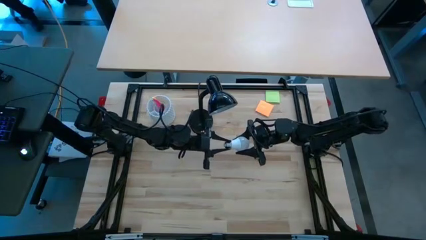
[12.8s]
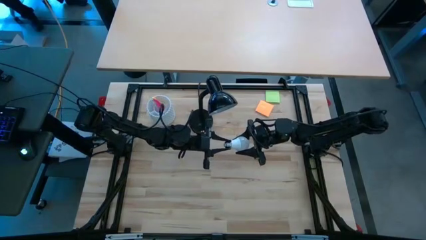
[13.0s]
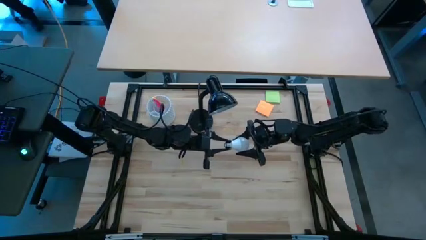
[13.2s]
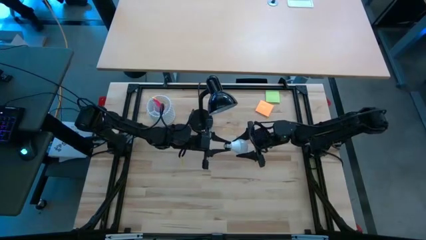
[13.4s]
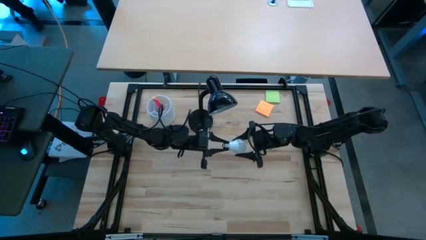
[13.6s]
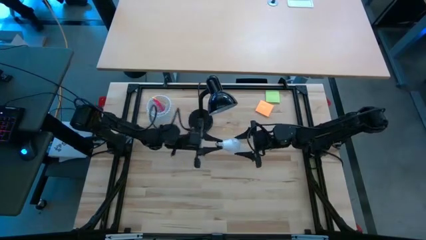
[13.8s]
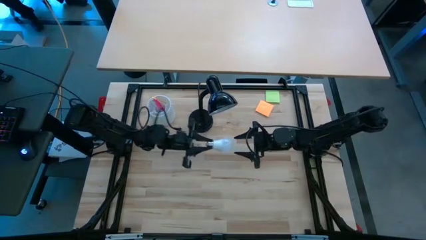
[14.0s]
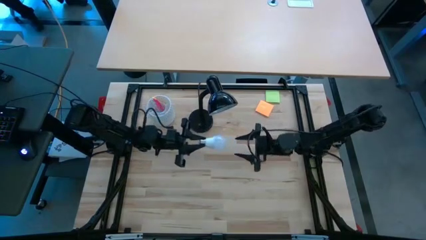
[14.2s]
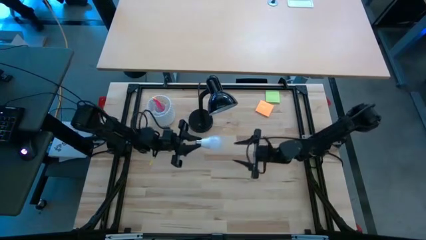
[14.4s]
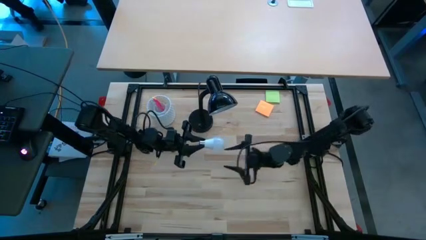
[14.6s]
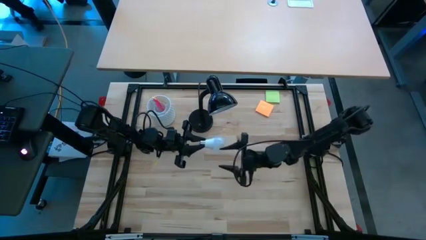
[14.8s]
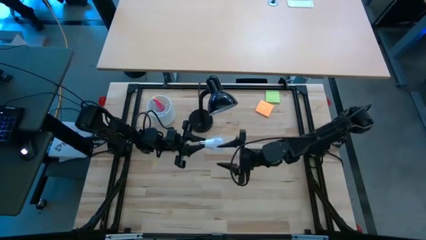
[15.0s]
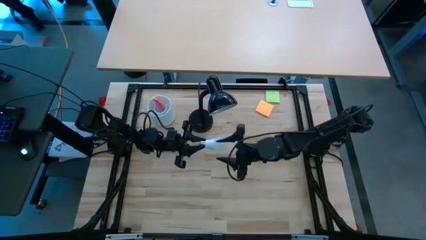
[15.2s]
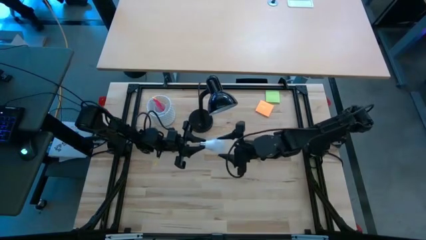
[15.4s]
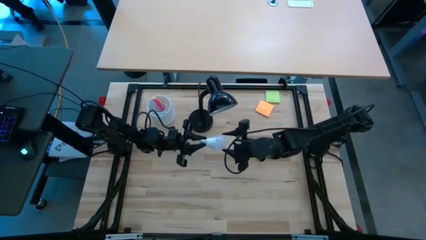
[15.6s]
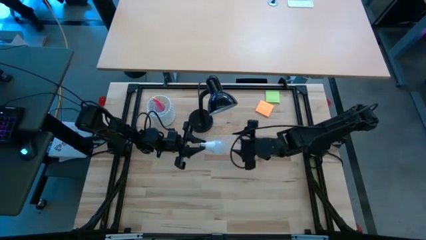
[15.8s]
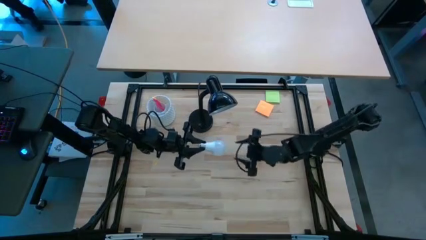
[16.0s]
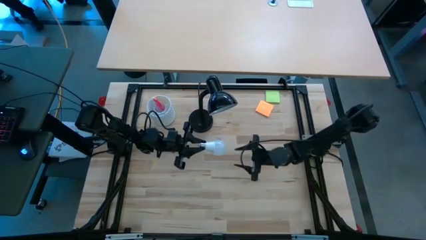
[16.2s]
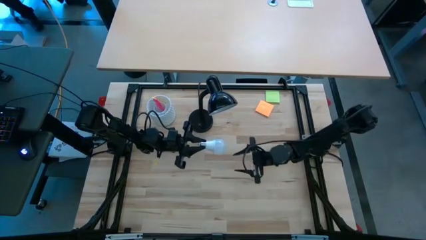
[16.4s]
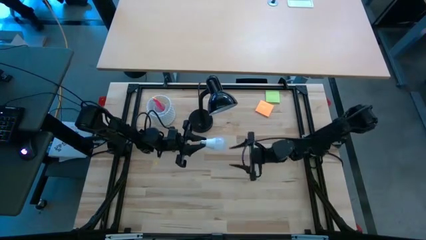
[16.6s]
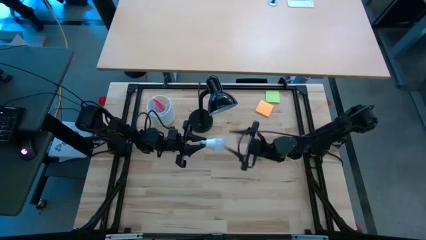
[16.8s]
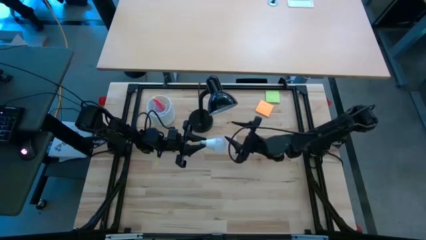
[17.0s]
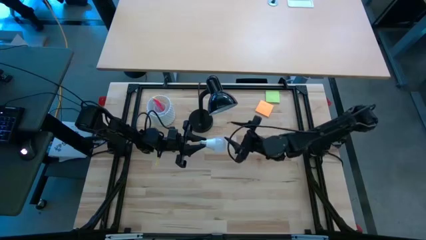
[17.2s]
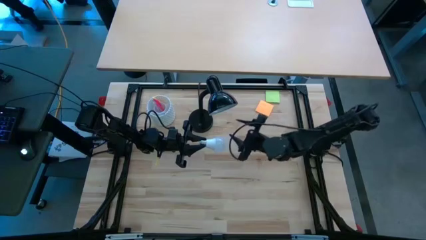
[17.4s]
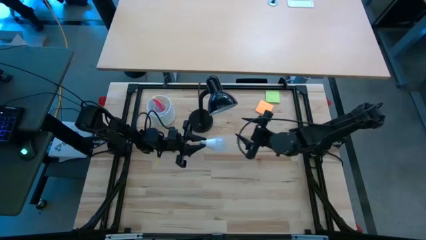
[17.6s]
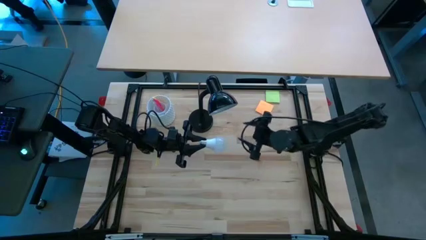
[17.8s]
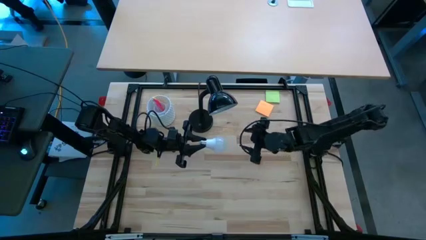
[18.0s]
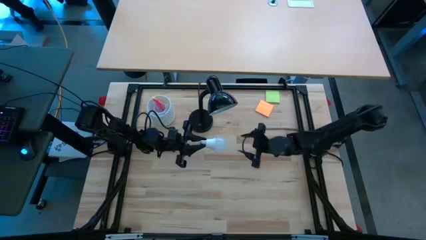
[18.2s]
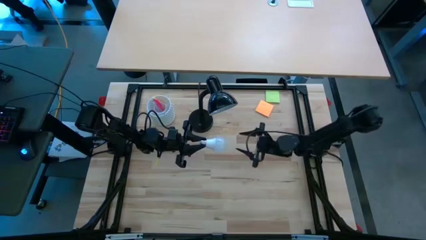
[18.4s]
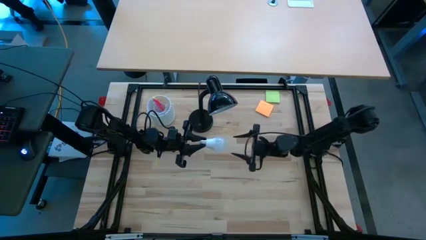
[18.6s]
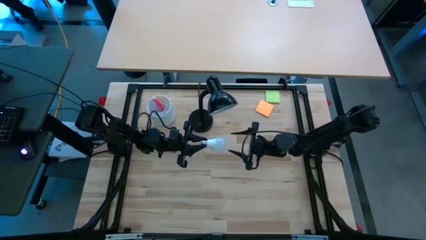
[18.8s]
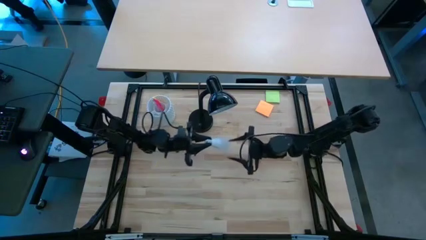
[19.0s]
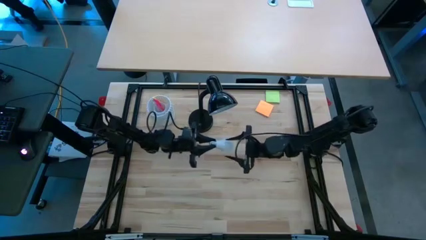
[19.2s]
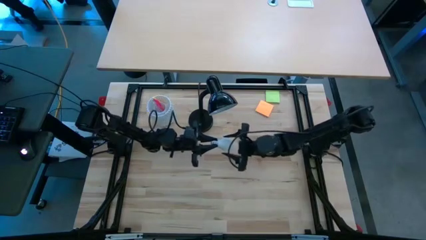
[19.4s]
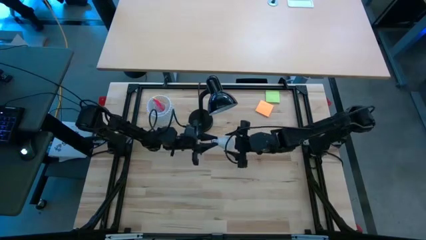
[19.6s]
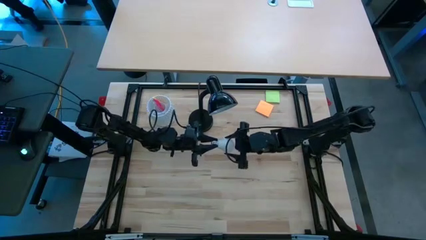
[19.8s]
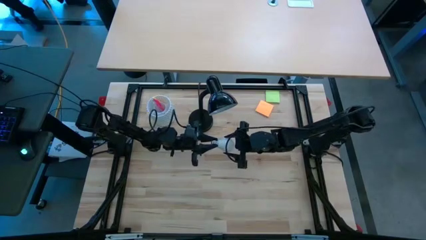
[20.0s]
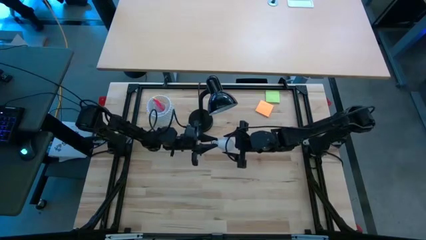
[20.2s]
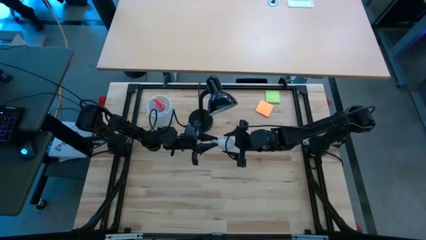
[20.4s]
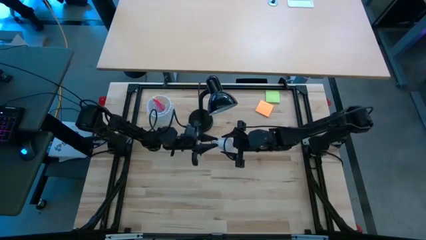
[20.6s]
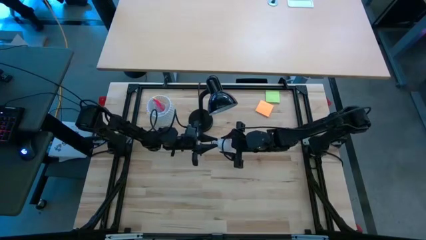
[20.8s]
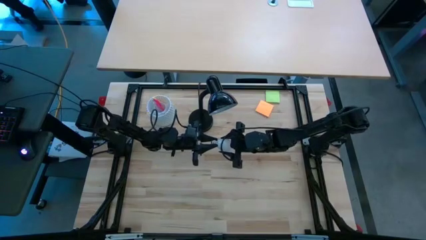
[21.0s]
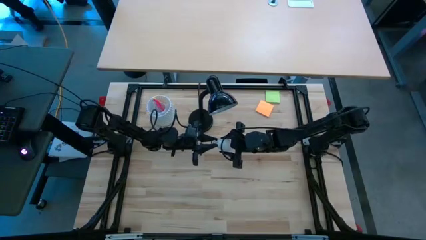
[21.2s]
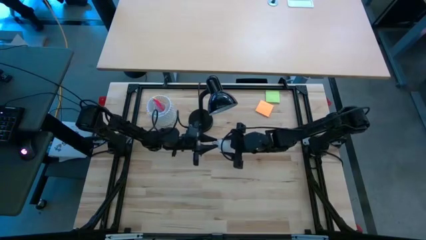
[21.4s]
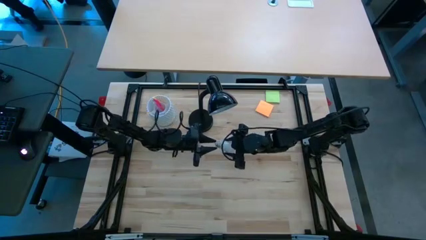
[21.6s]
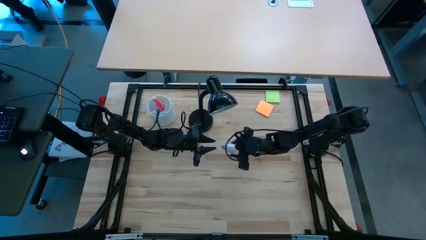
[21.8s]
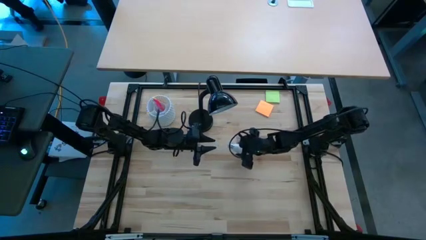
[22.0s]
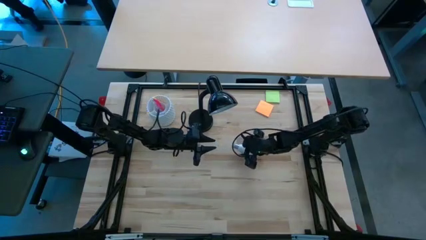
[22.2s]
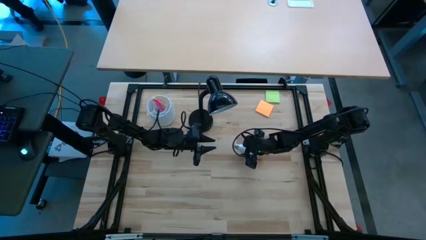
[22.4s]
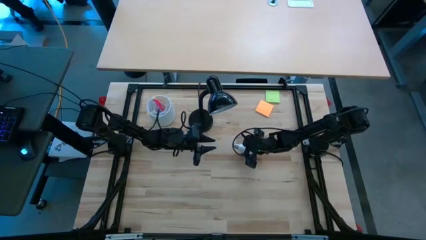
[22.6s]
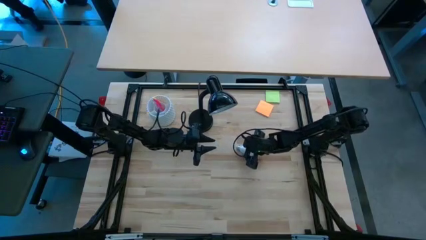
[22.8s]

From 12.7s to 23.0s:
Task: Screw lightbulb
Prepare the light bulb

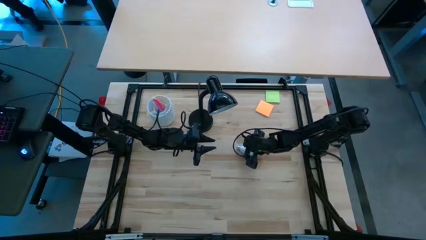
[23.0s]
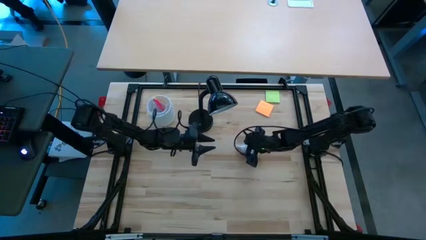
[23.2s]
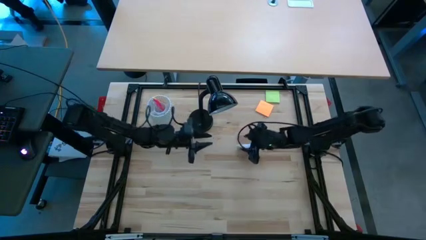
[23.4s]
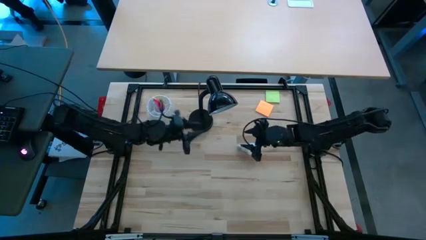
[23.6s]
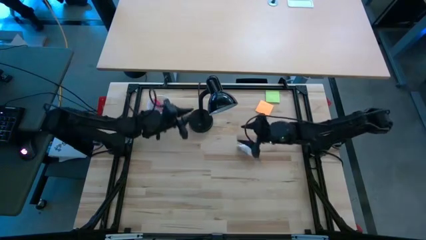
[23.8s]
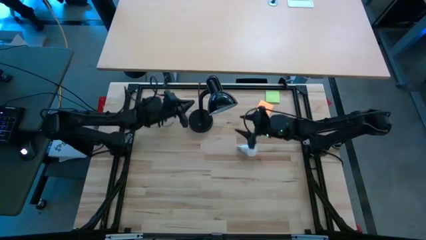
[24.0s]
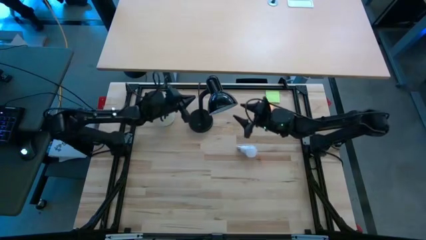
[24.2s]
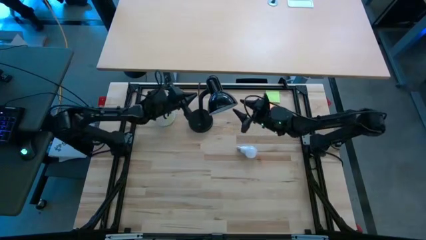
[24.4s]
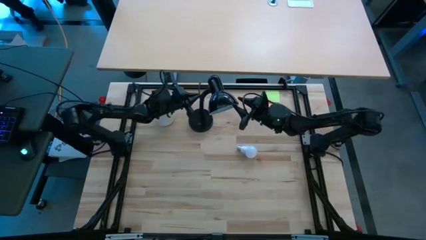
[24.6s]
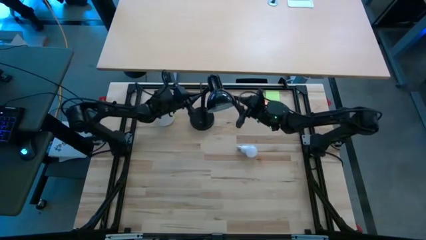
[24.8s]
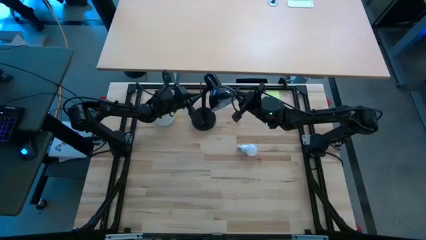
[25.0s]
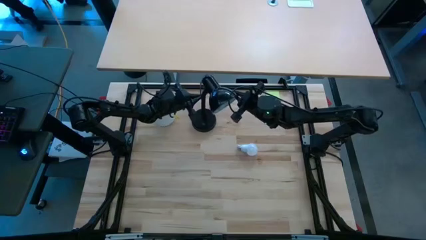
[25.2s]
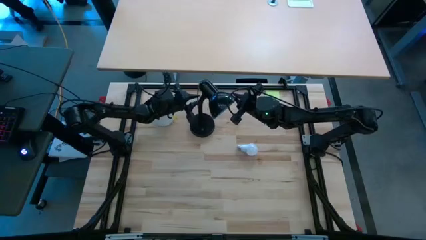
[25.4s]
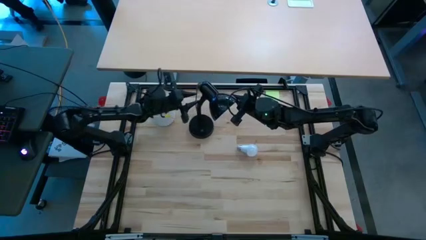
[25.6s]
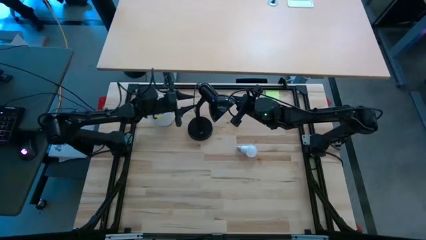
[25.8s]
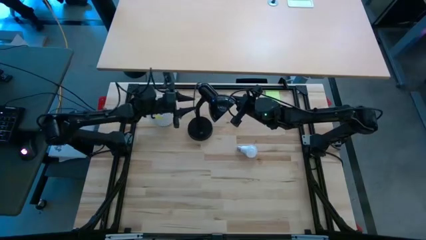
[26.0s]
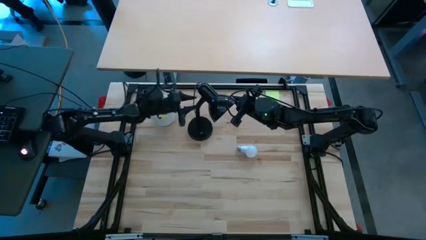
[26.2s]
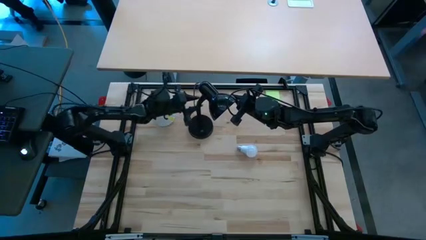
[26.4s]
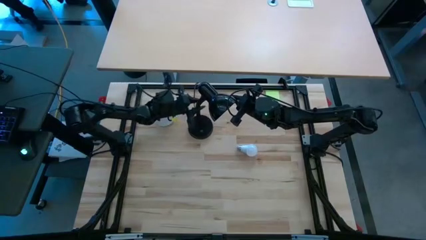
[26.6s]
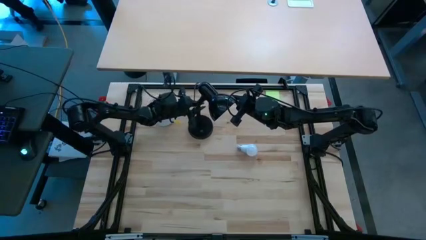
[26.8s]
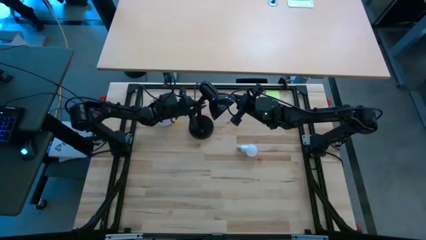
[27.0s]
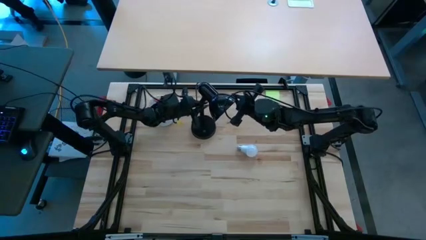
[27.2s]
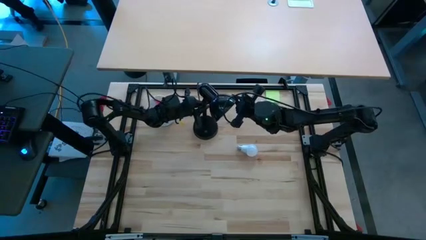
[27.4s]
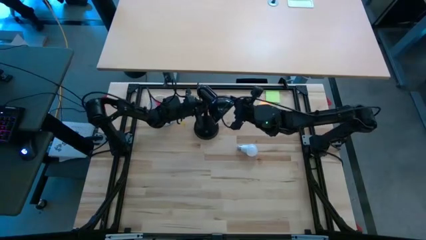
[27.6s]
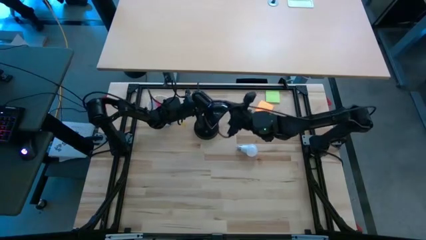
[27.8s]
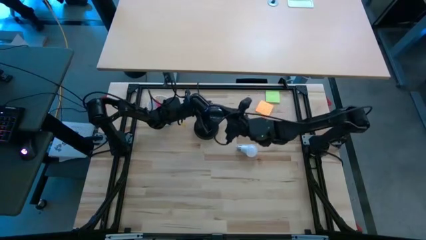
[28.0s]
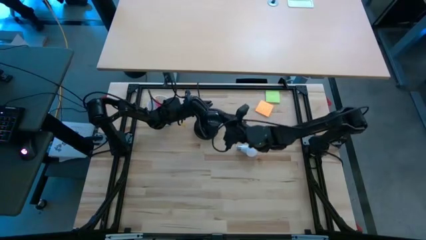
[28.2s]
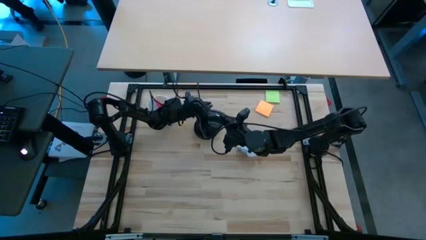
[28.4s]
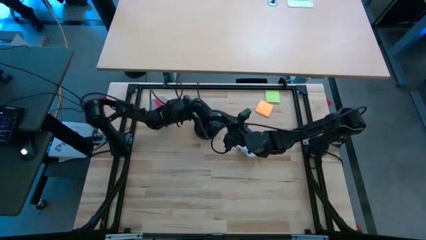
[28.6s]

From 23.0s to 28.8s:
Prepare the desk lamp
